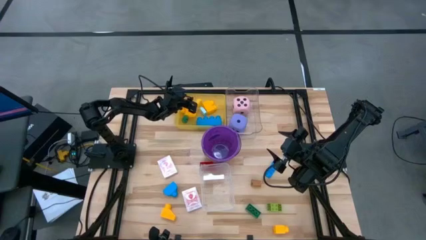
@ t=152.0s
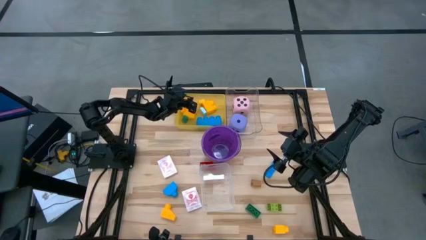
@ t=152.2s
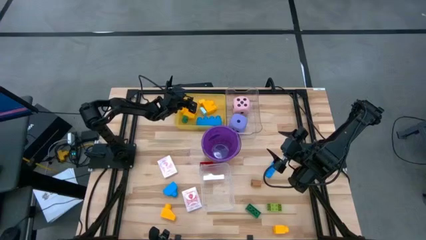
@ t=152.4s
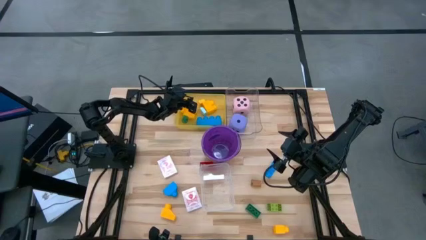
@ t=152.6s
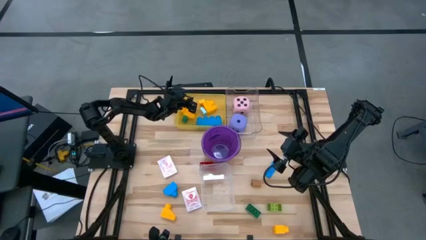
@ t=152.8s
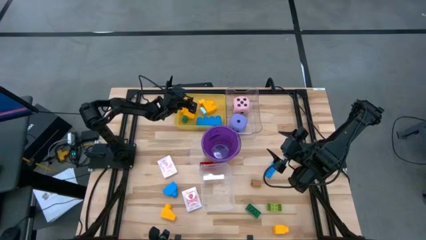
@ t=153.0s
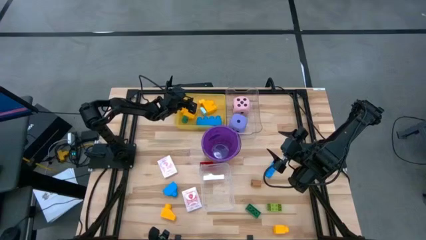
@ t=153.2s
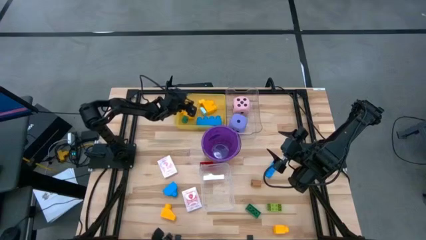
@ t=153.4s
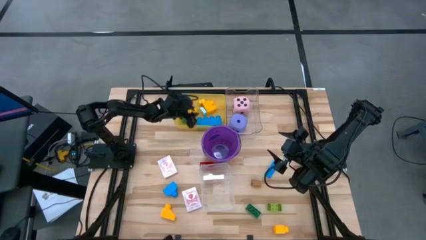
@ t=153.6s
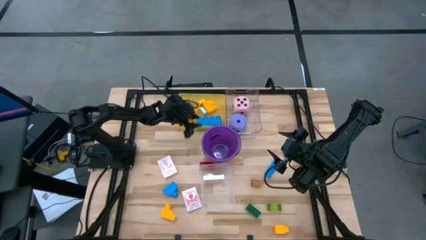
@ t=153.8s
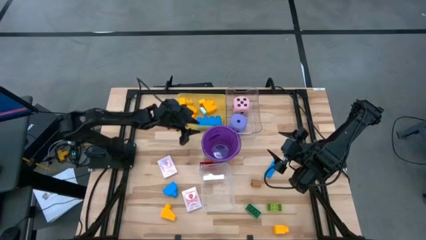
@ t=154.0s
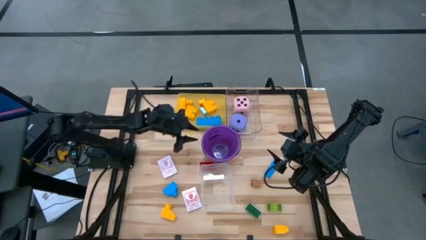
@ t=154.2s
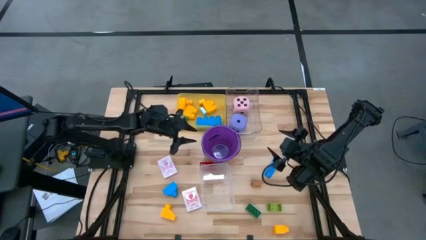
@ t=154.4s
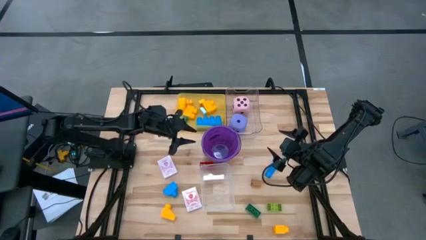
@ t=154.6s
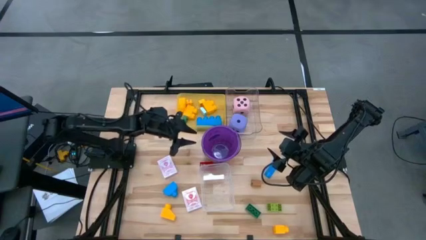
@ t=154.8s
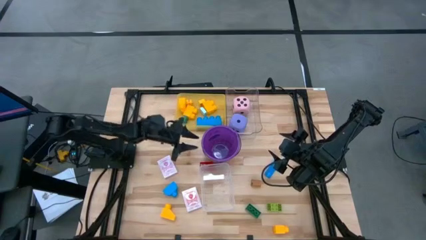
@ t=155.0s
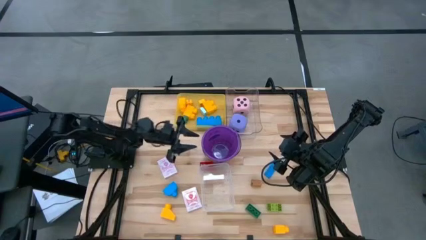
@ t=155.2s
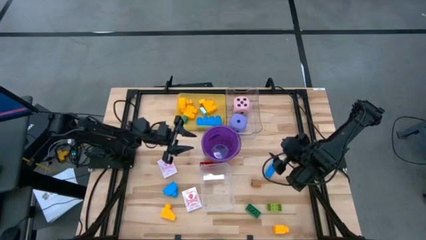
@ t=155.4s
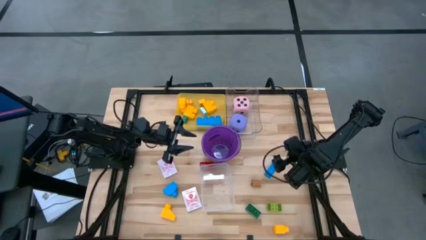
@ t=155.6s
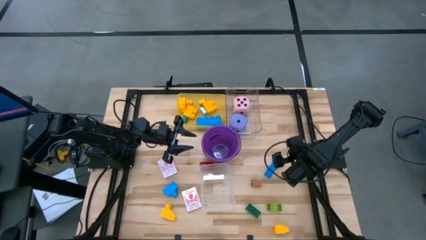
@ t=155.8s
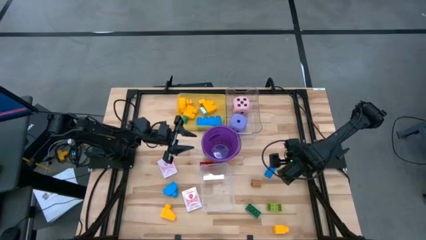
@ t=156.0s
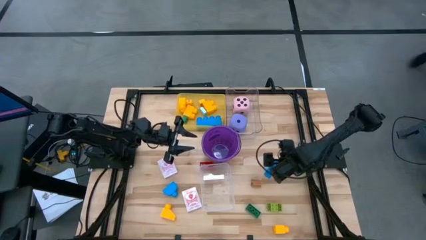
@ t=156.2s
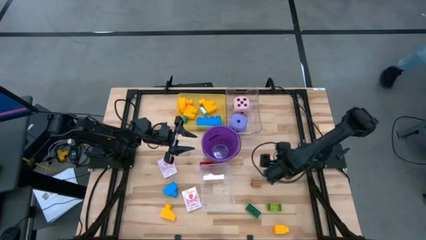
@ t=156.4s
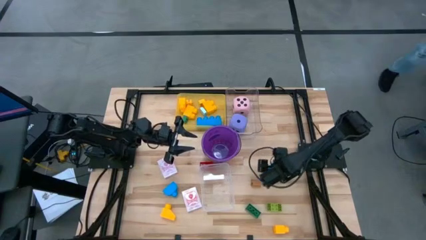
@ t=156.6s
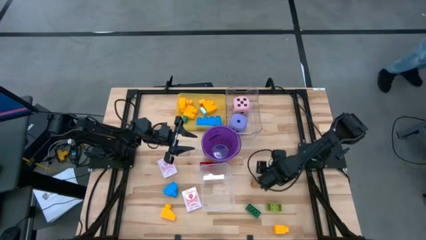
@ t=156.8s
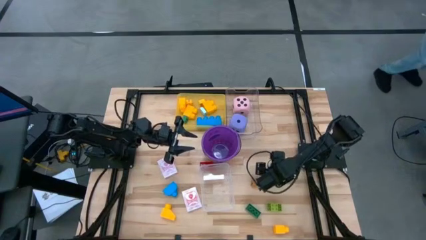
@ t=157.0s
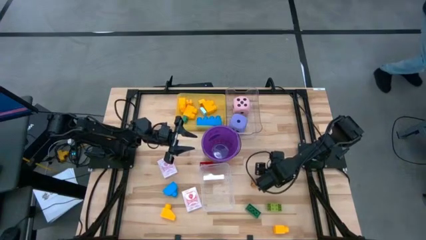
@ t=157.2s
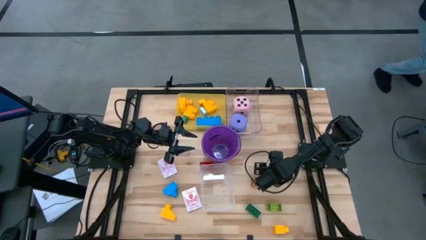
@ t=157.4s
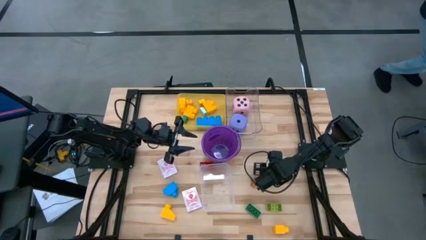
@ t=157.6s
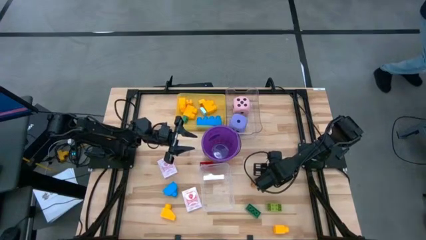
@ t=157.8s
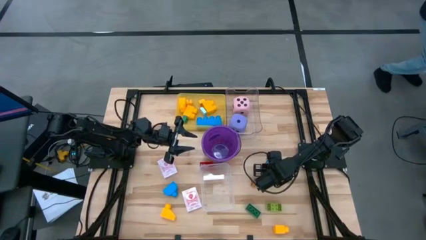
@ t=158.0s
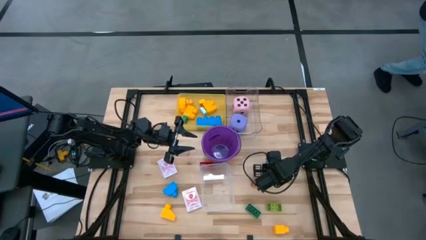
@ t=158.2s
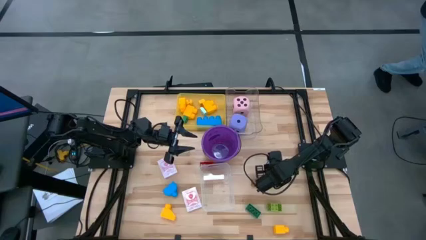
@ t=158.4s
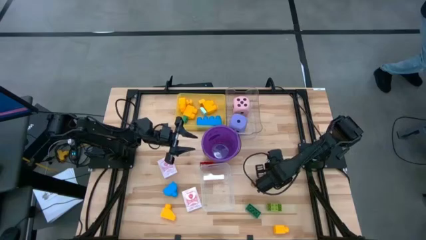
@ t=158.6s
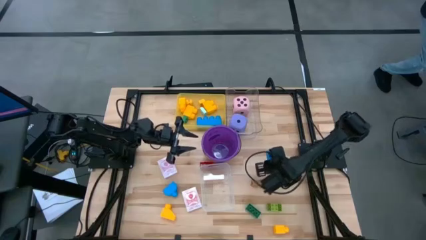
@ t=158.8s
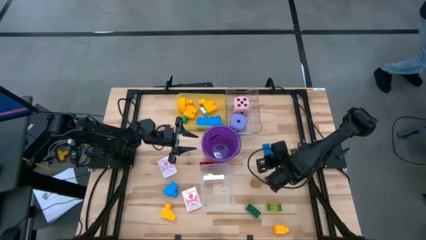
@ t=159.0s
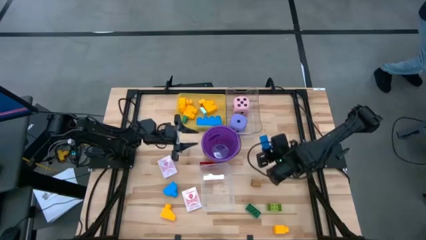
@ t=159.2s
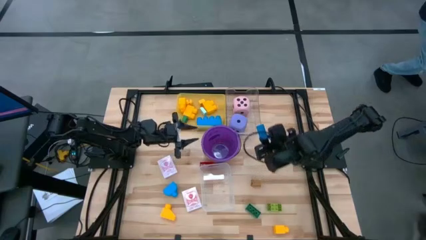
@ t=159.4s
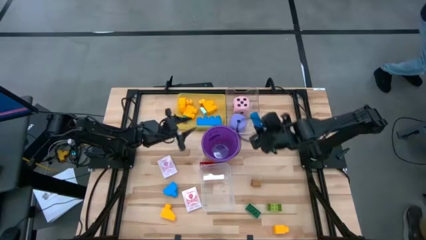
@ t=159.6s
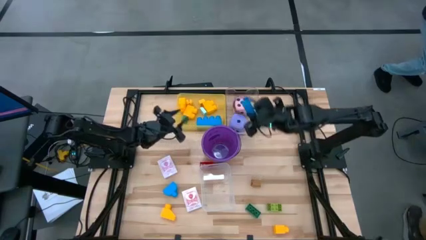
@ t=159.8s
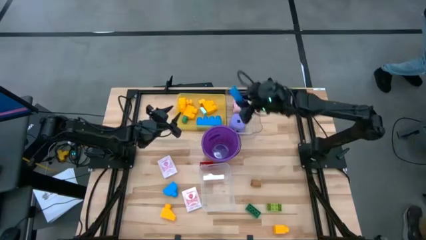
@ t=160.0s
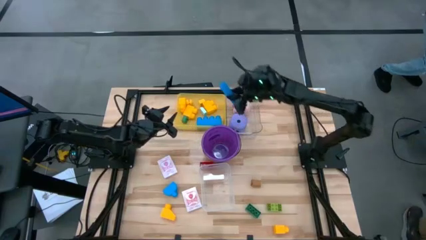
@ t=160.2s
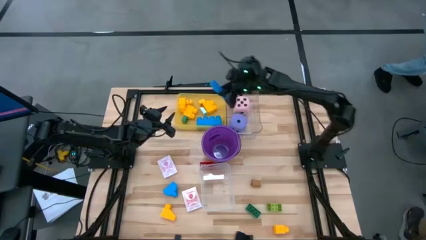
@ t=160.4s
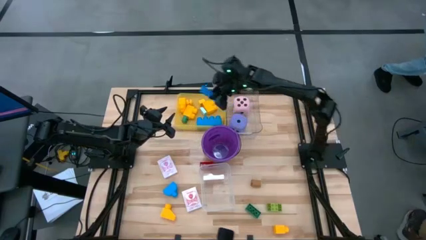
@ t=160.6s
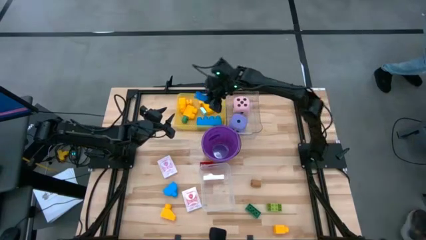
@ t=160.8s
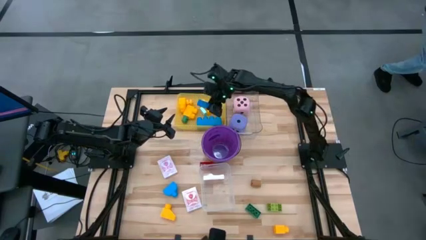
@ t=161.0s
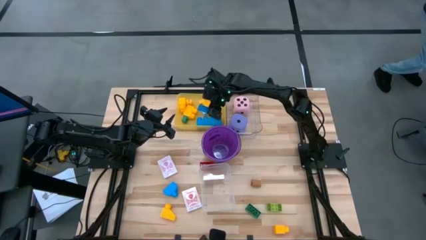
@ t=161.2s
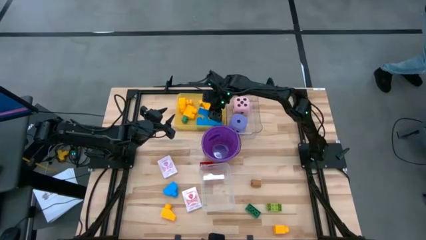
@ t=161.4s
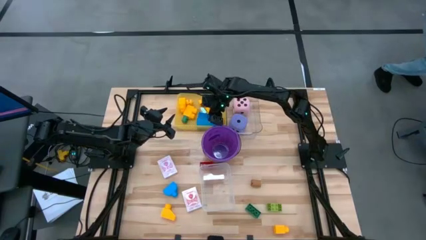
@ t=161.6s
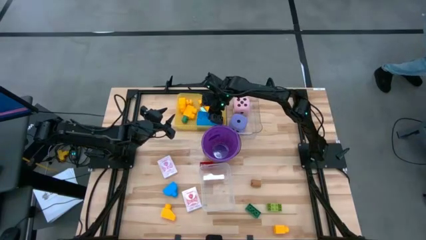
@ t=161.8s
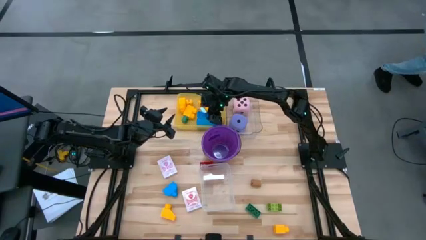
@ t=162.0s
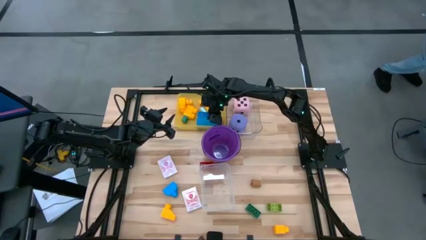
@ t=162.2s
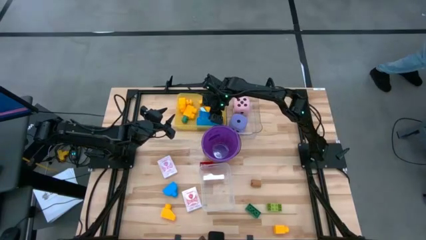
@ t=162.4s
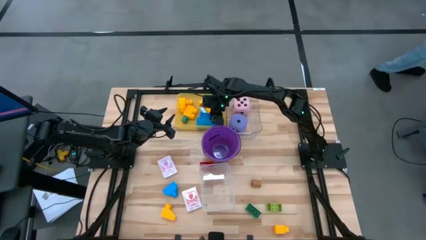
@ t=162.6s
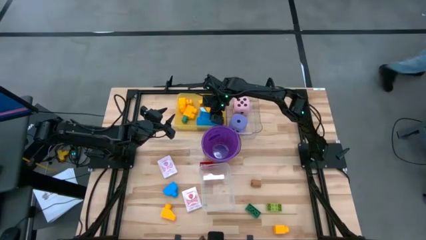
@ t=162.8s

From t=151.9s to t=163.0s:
Task: Pick & Place Toys
Put the blue game piece into the yellow bin

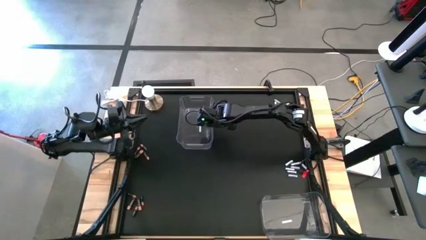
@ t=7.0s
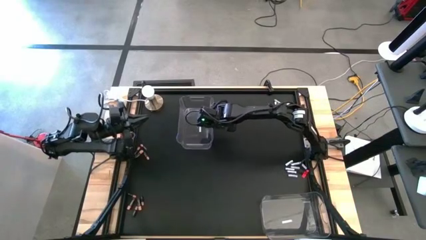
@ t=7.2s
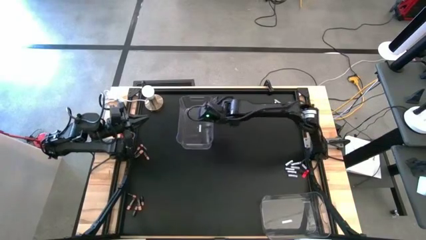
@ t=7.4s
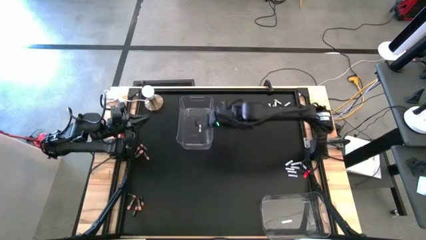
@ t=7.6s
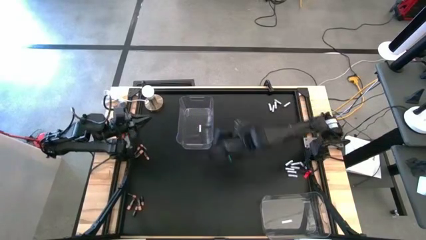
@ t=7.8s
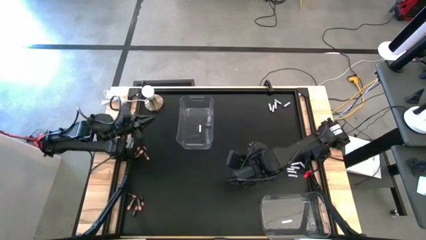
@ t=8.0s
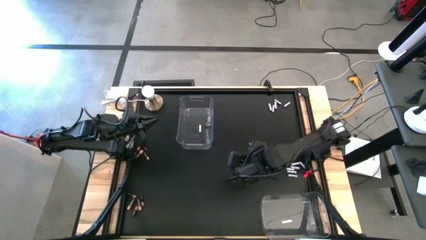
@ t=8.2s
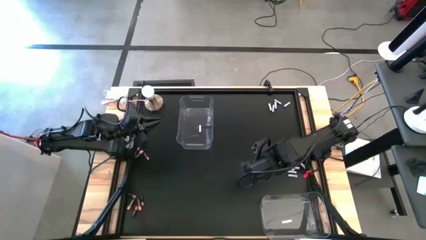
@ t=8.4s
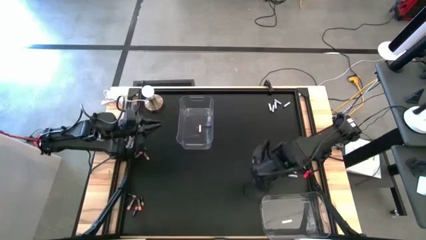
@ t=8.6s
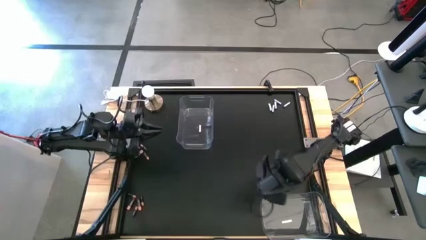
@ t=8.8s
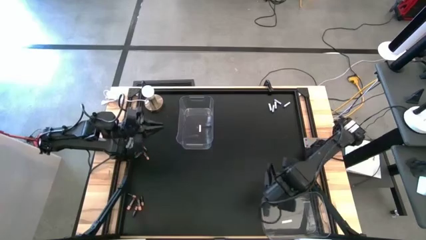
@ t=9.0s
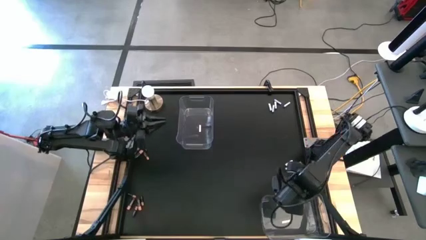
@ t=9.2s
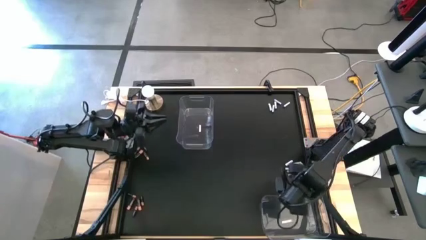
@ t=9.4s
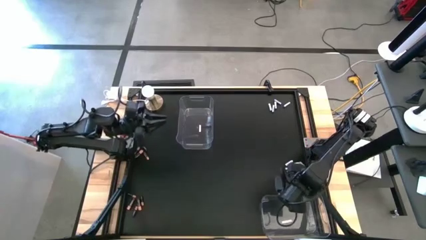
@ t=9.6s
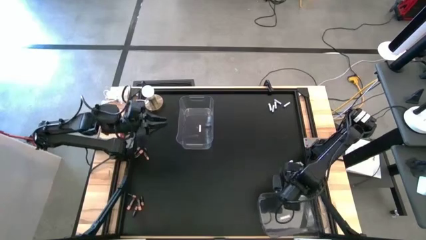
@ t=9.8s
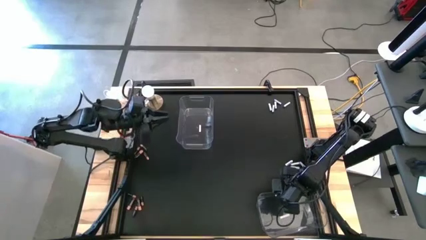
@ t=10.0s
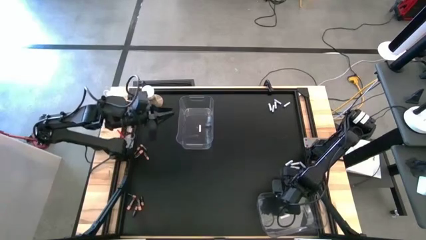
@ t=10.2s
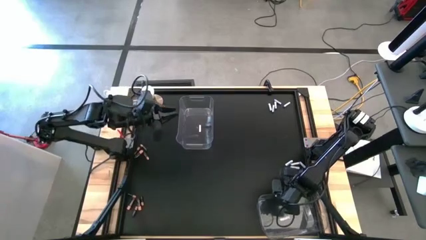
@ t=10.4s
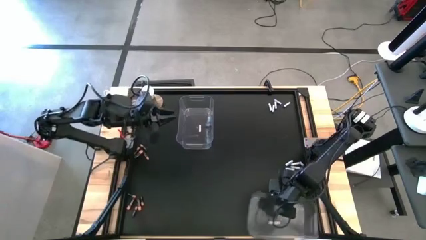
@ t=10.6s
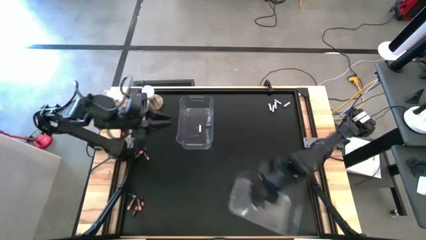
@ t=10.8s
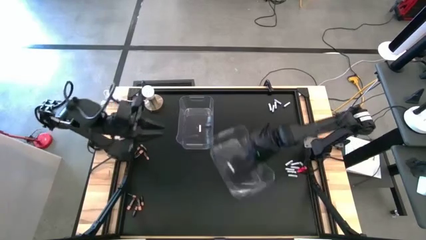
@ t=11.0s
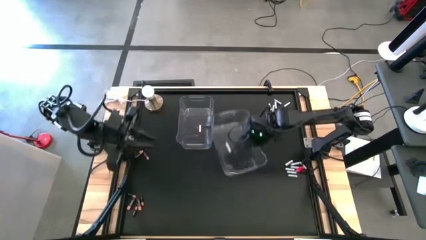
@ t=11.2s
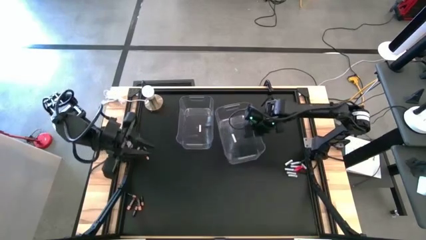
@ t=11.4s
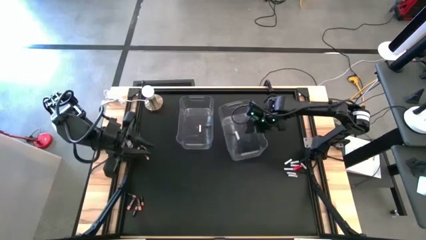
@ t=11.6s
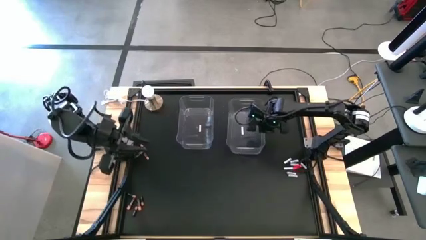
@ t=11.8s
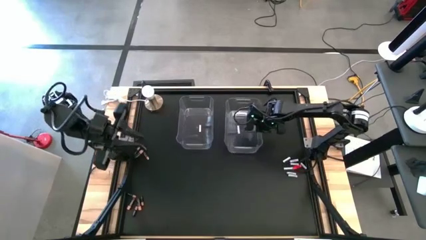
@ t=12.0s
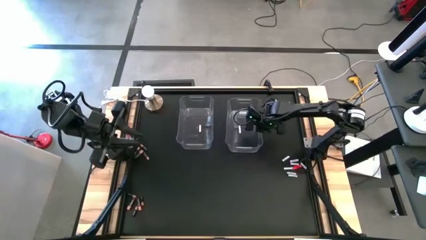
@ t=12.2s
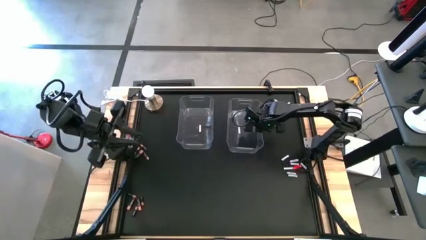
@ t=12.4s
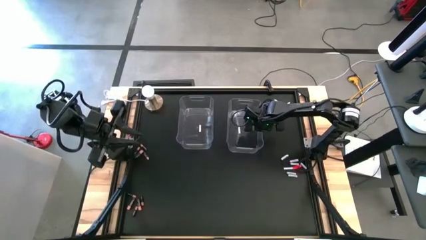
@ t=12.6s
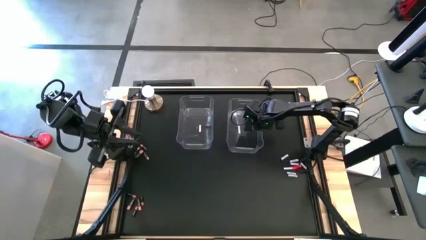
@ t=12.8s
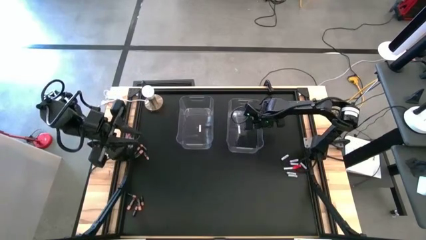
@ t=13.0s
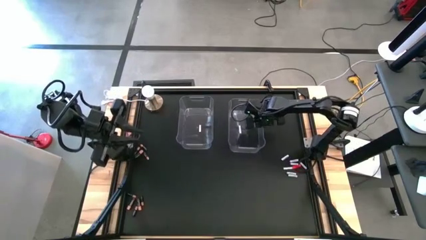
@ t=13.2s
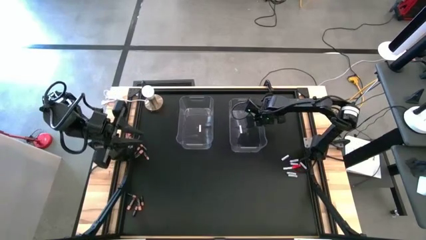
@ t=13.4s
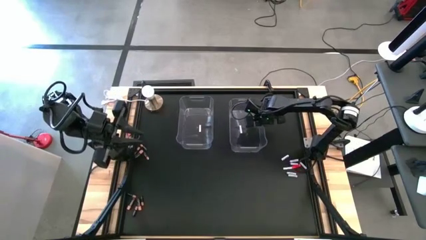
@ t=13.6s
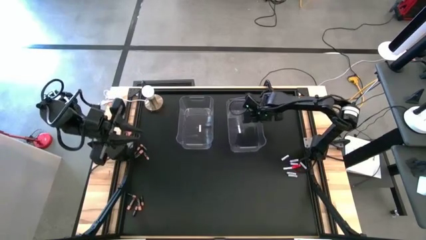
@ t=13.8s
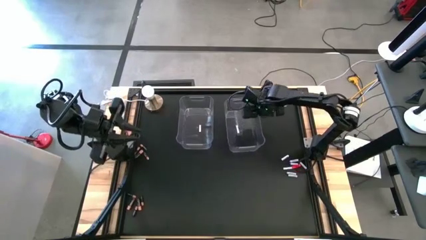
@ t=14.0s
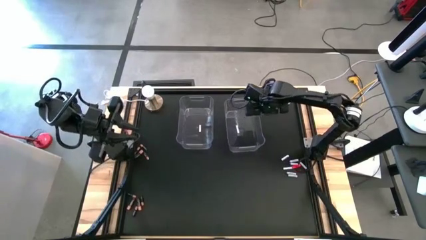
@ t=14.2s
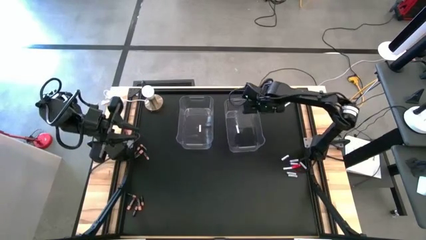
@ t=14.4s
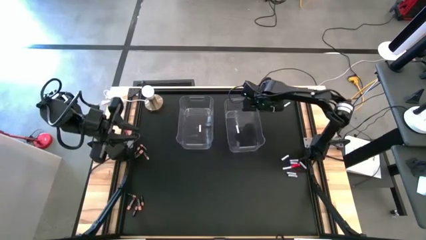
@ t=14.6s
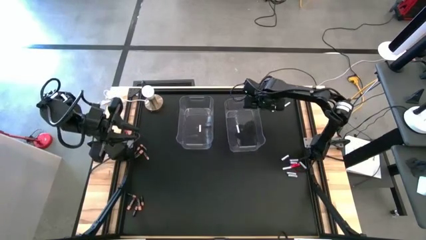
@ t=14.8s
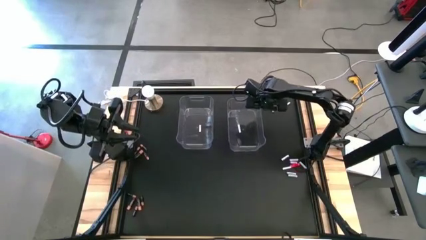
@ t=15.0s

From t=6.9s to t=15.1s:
Task: Sort batteries
Move the bottom transparent bin to the top right of the table
